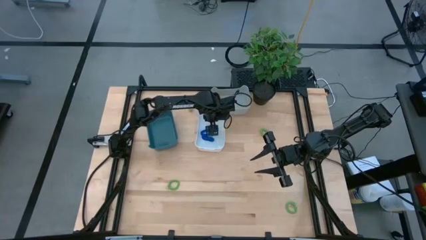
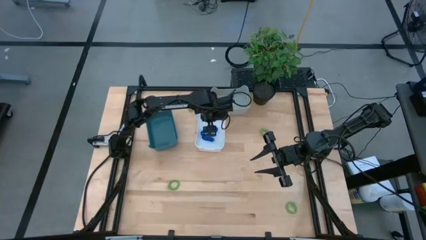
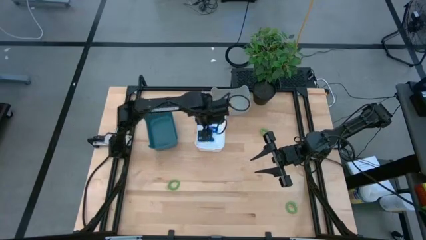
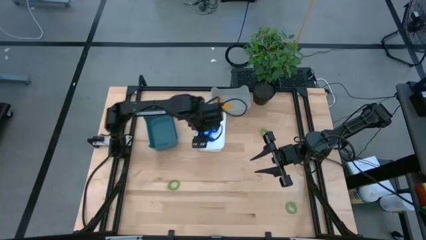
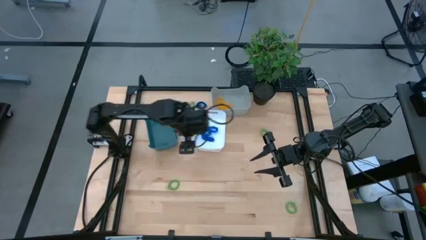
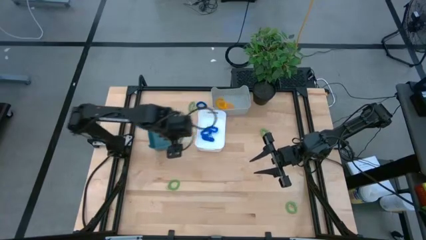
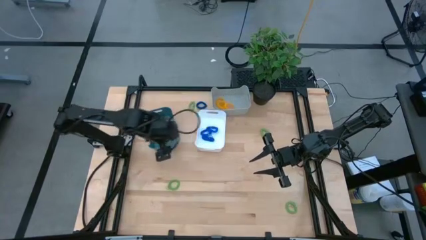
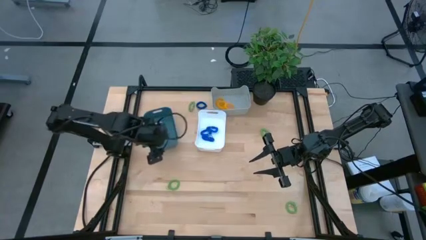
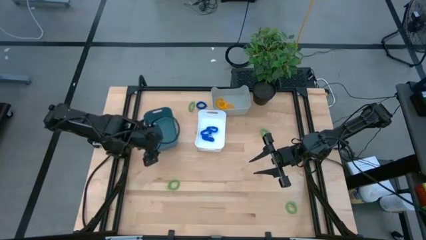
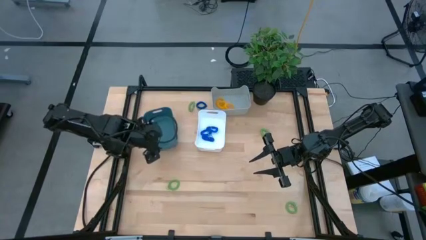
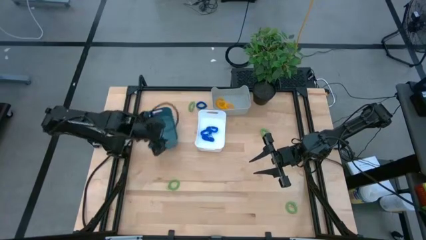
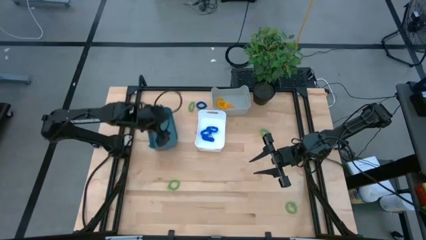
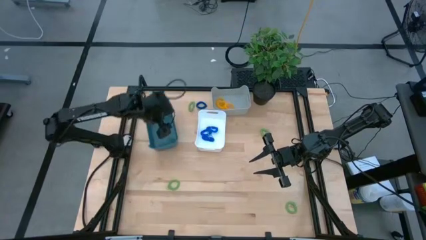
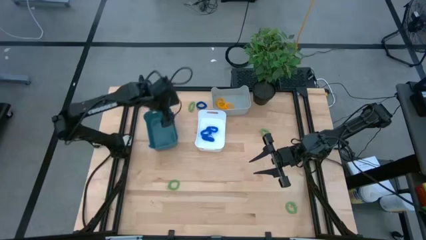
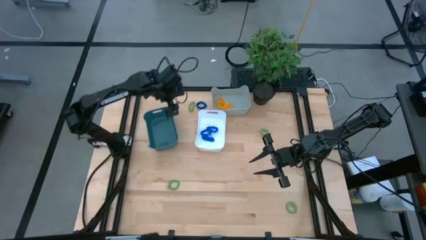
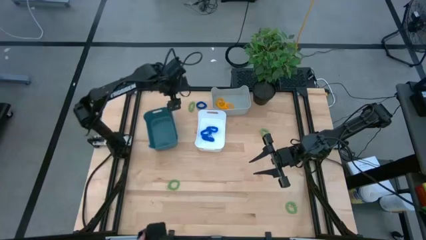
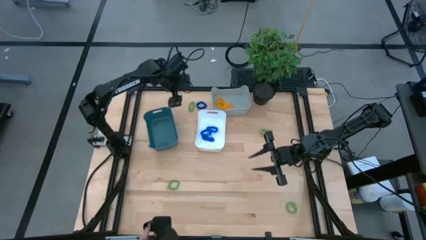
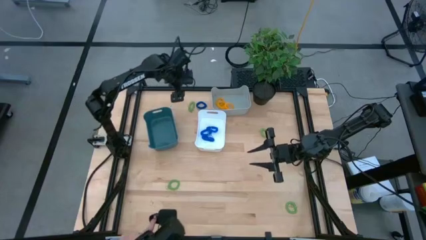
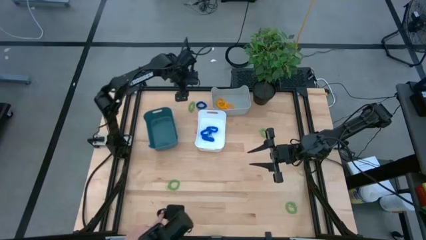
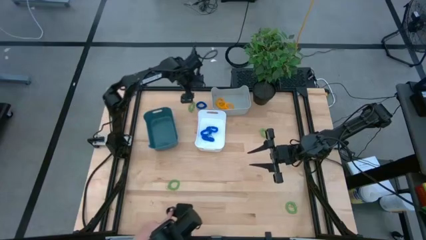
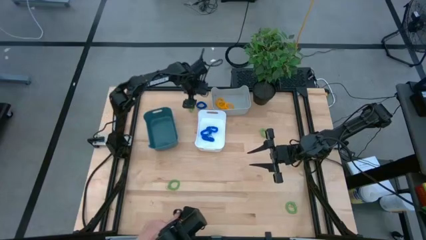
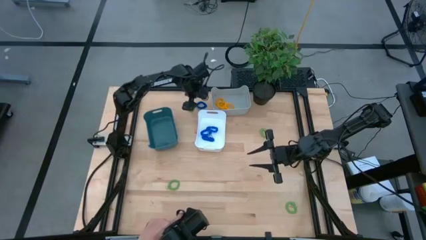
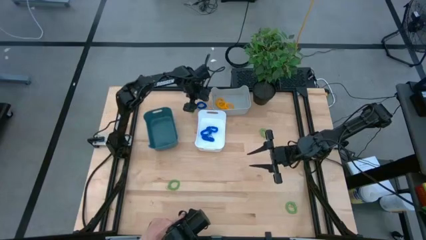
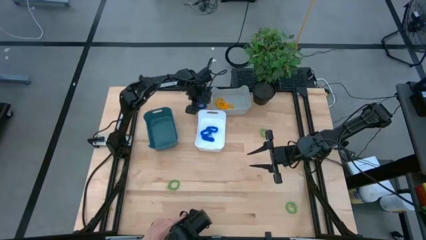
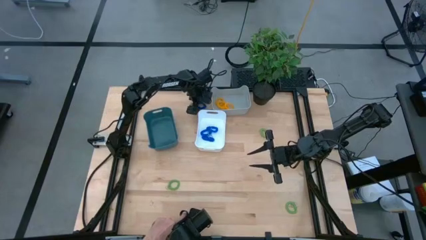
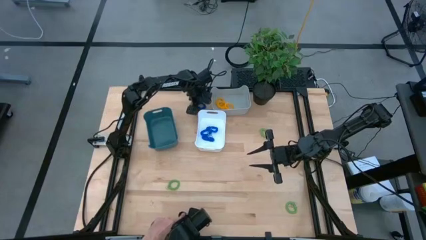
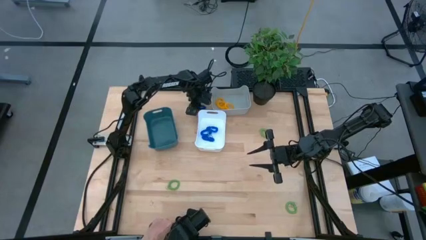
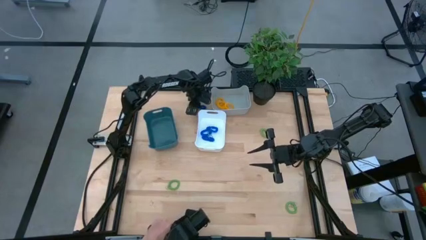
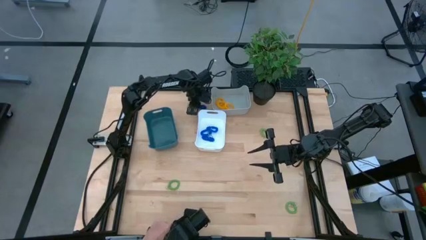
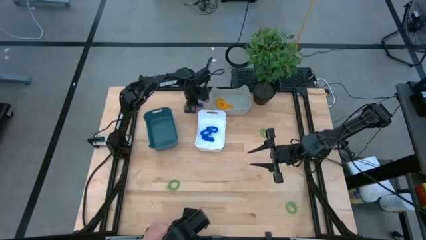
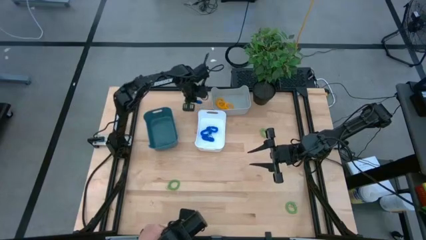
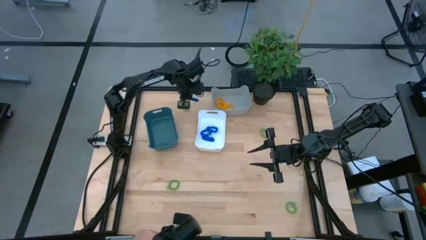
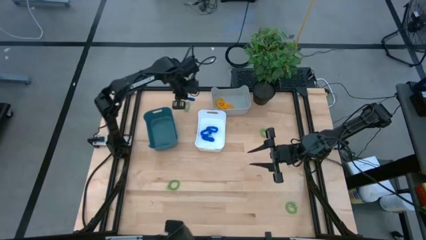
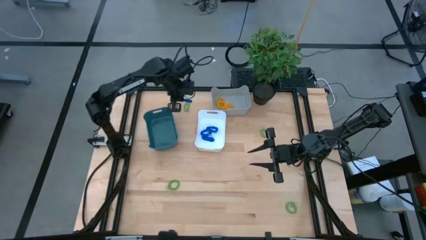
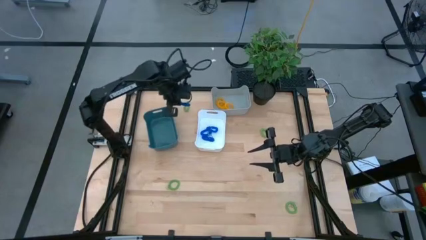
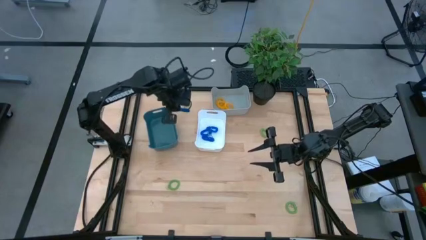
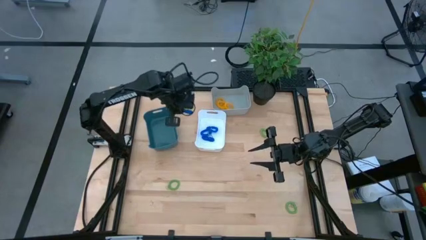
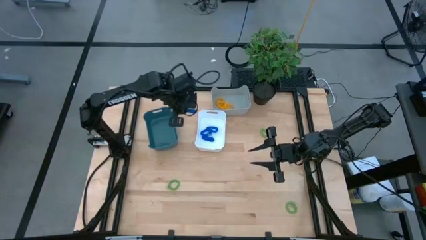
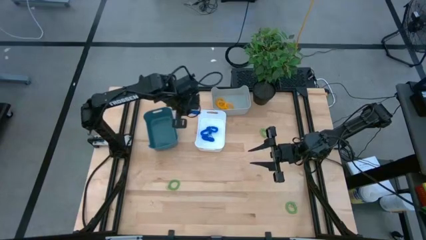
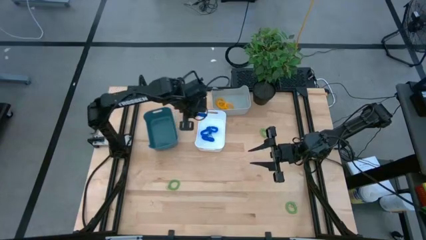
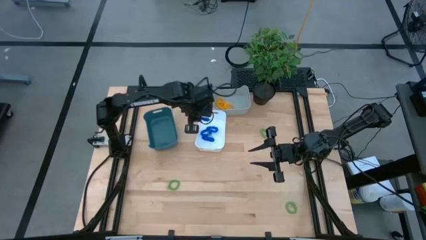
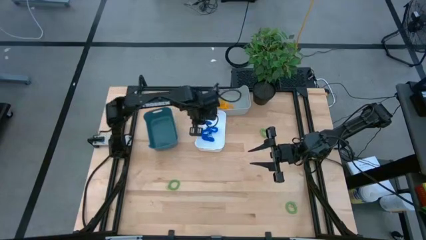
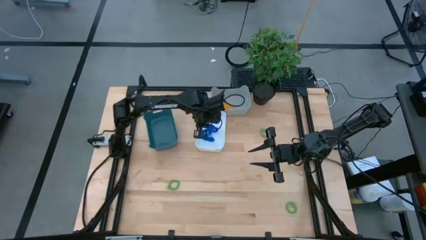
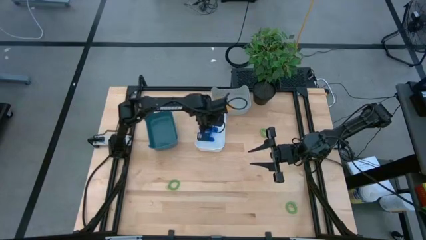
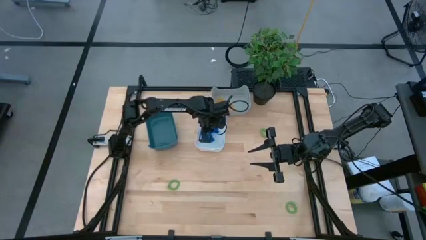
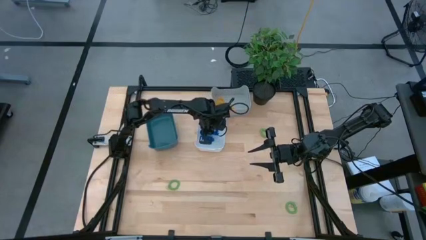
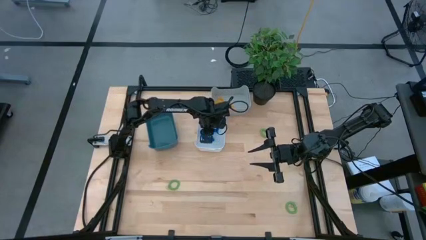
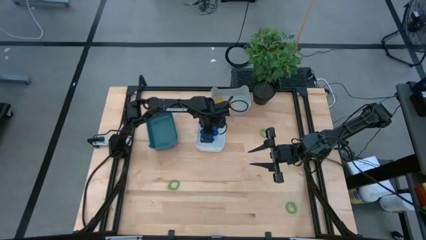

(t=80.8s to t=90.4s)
Task: Sort spring keychains
Put the blue spring keychain into the white bin

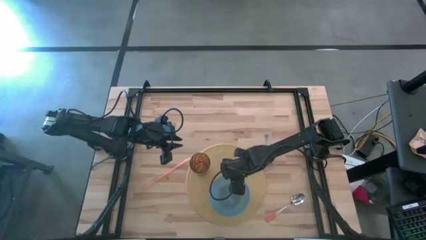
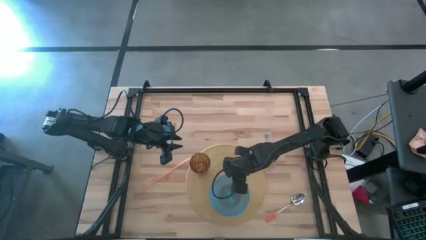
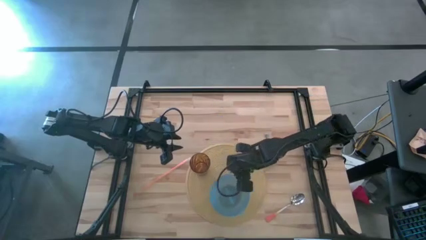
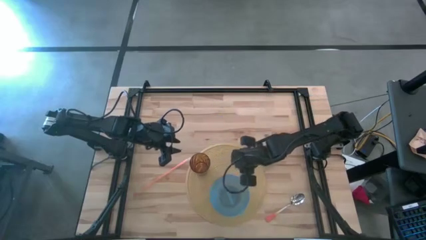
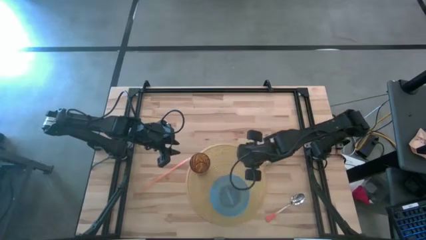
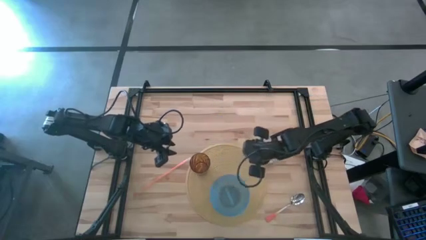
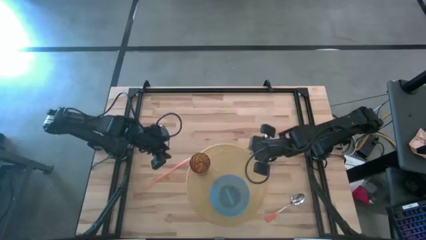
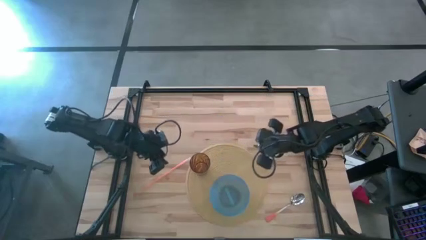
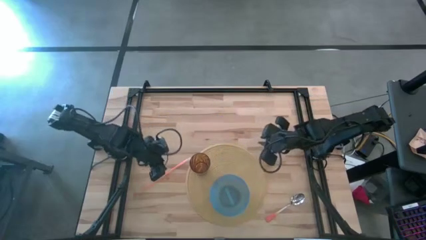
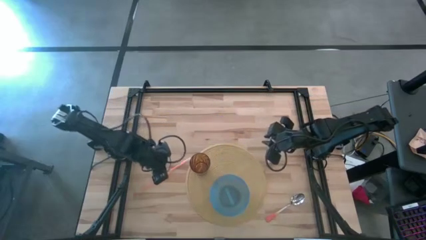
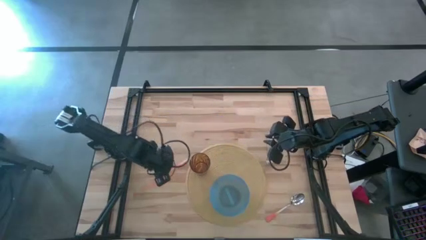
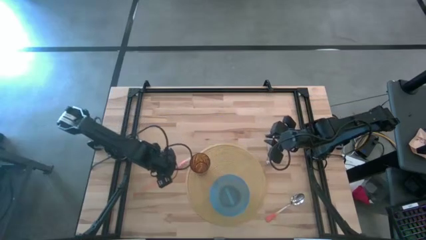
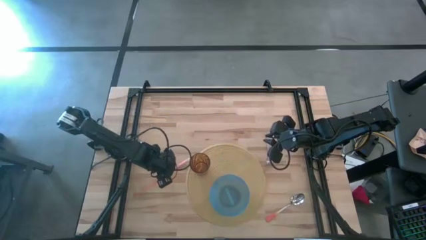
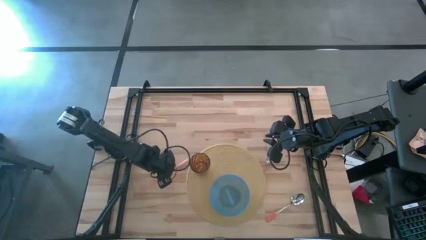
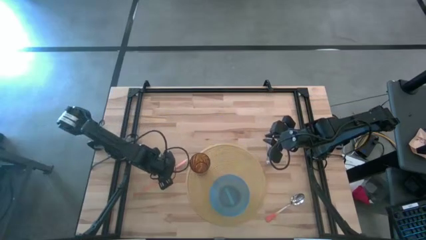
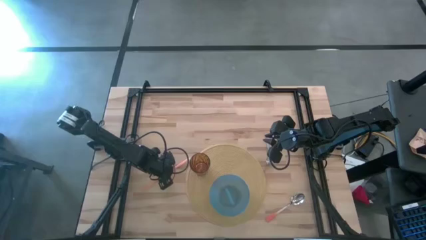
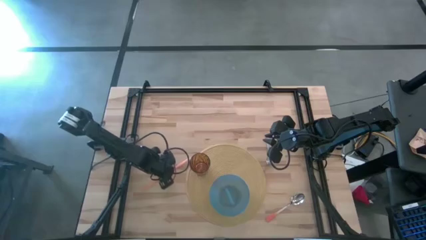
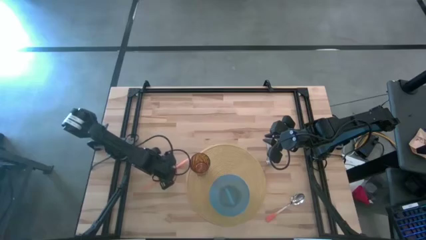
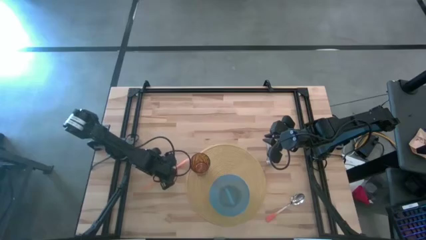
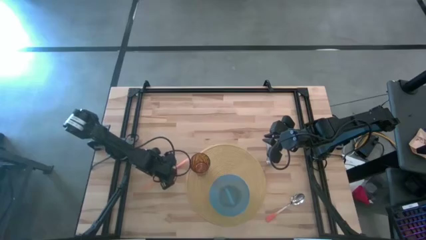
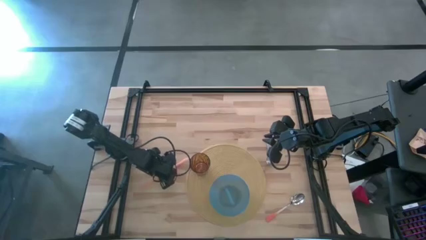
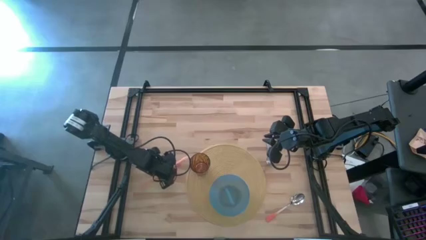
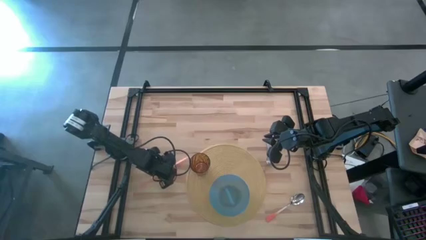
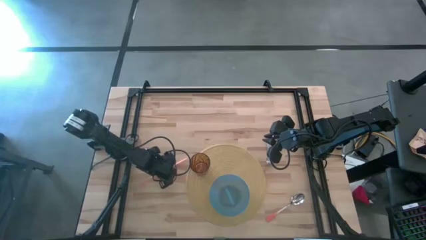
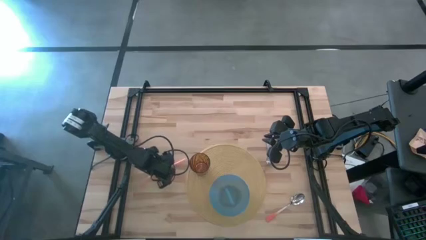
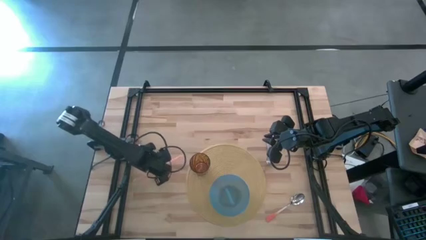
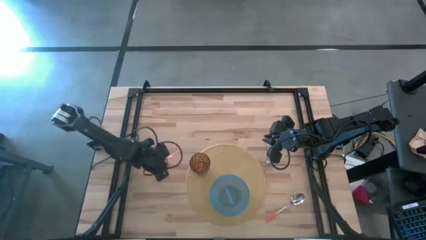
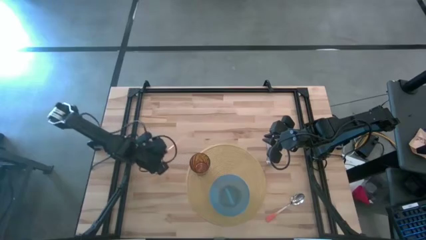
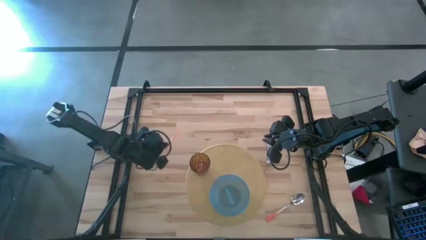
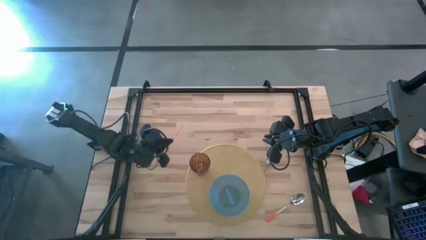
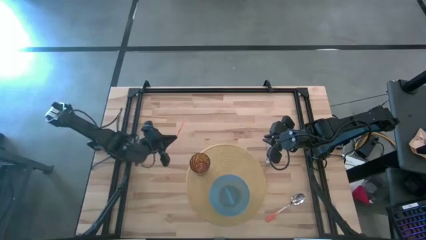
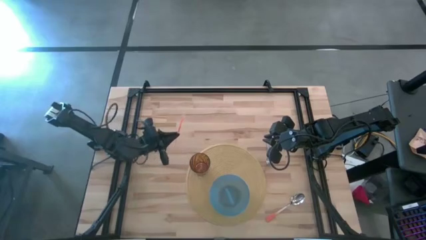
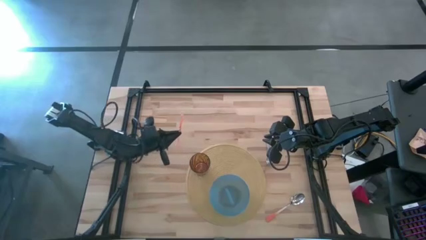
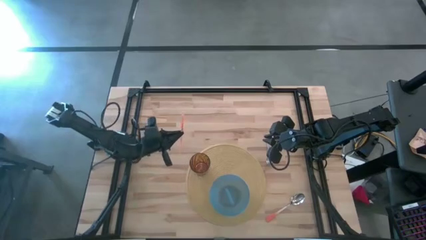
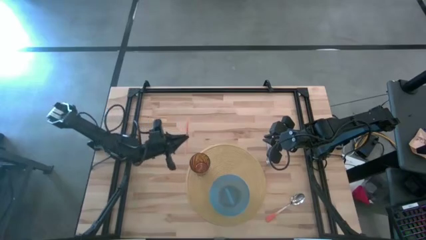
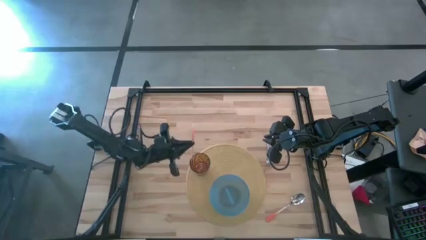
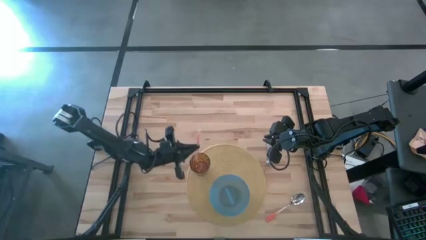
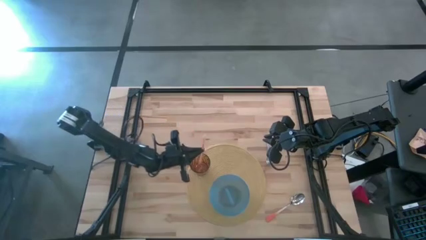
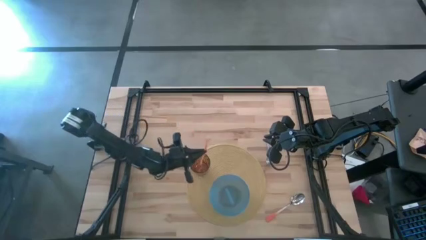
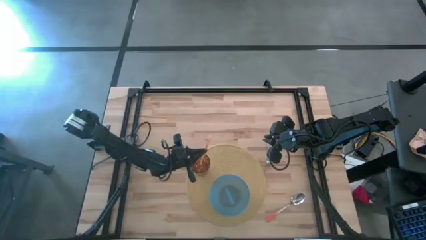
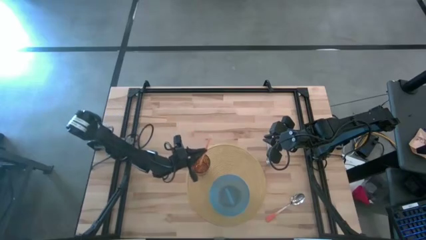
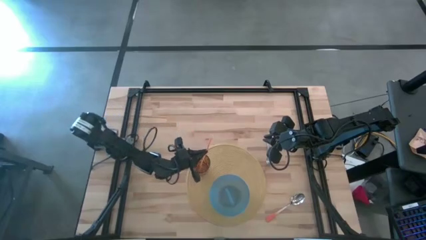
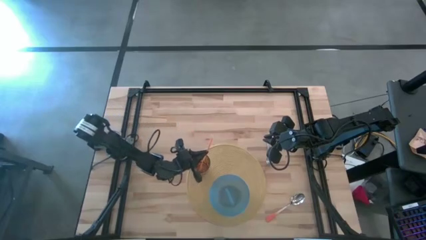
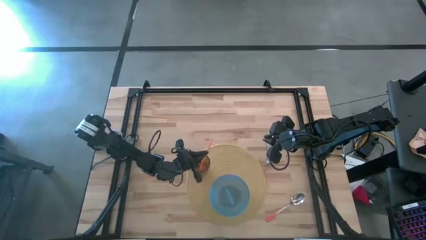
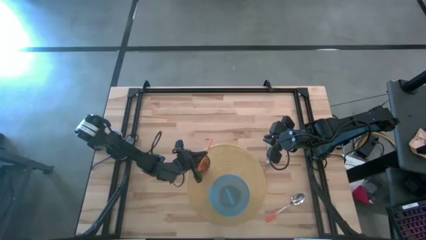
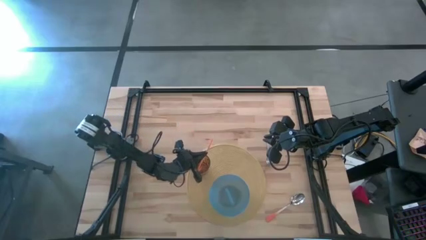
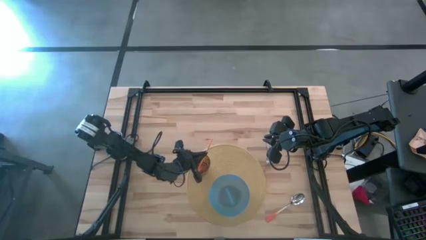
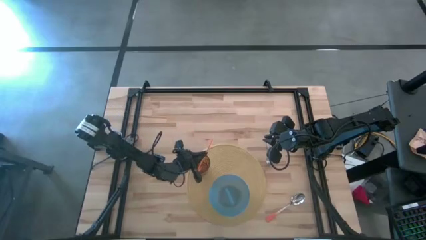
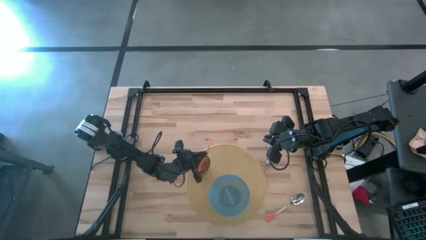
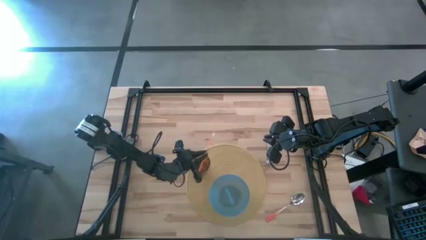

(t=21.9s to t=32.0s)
Task: Pick & Place Utensil
Put the orange straw into the brown cup on the brown mat
